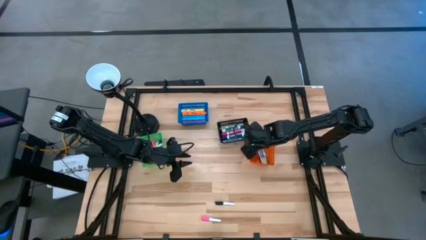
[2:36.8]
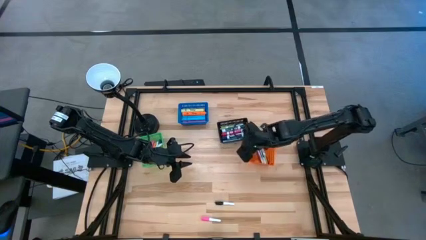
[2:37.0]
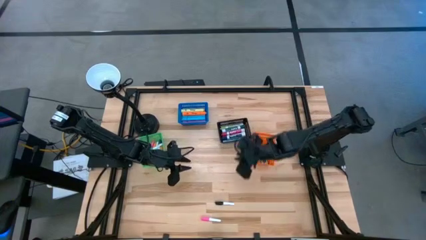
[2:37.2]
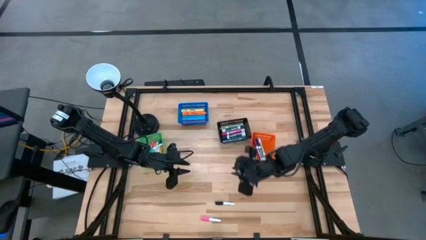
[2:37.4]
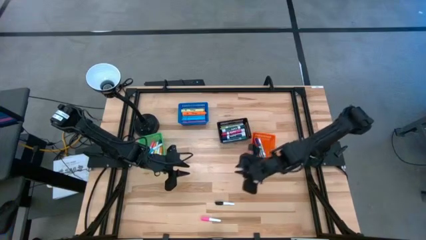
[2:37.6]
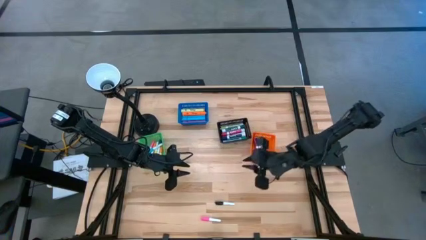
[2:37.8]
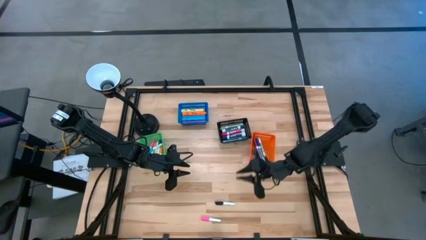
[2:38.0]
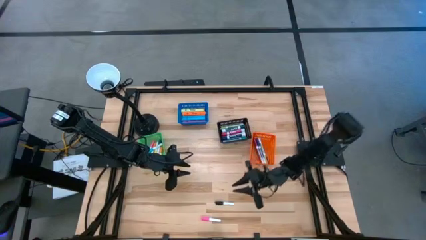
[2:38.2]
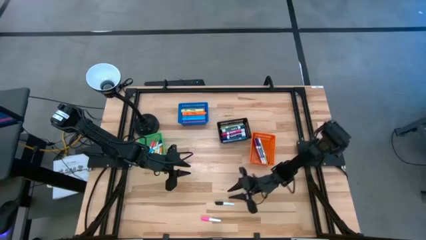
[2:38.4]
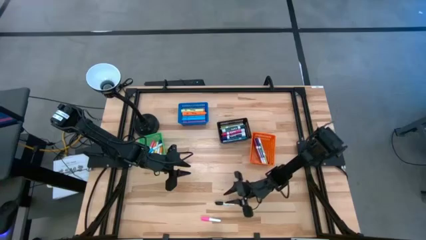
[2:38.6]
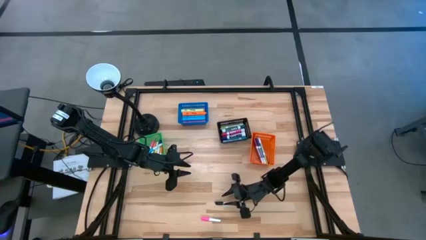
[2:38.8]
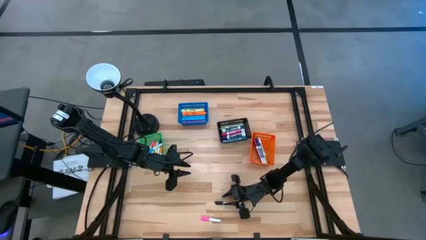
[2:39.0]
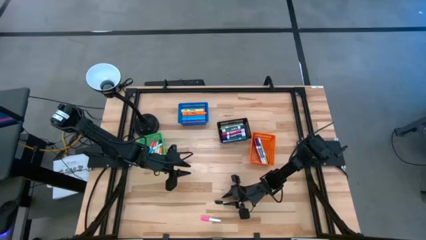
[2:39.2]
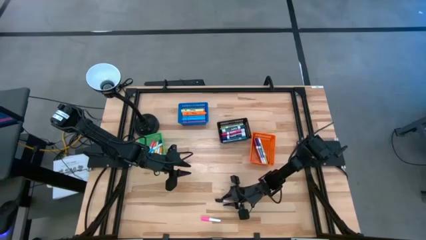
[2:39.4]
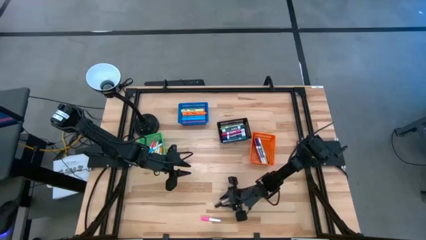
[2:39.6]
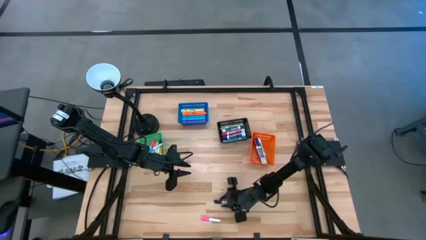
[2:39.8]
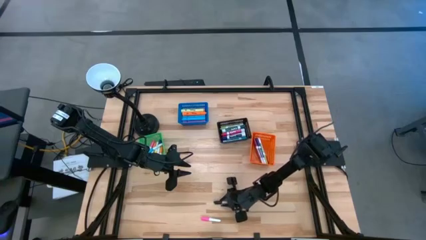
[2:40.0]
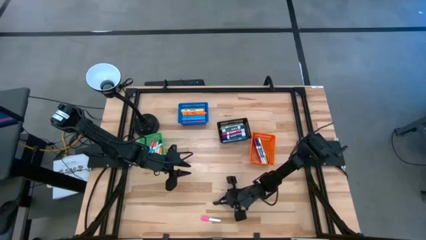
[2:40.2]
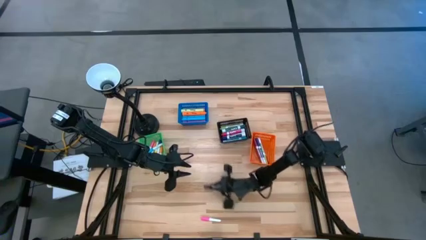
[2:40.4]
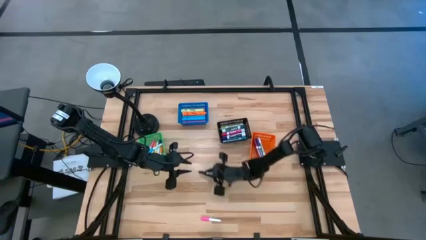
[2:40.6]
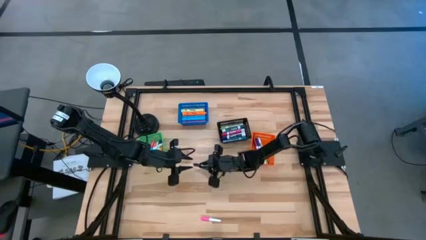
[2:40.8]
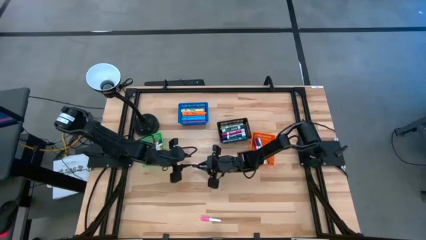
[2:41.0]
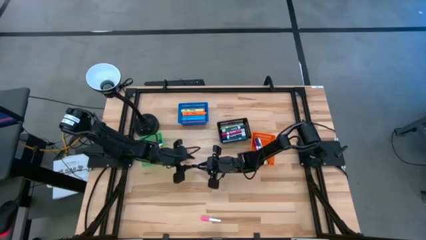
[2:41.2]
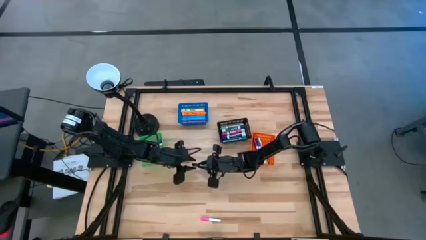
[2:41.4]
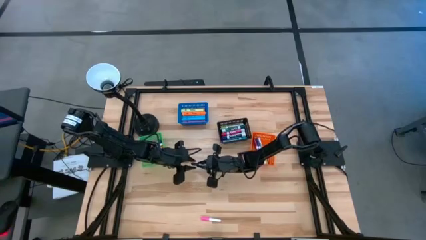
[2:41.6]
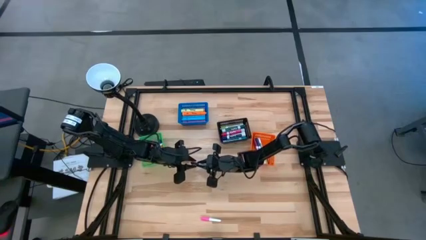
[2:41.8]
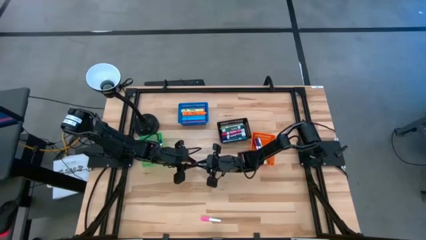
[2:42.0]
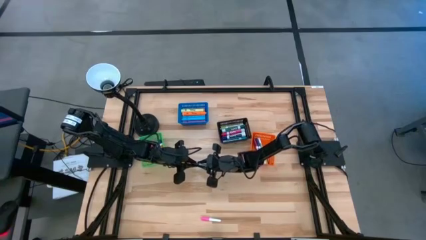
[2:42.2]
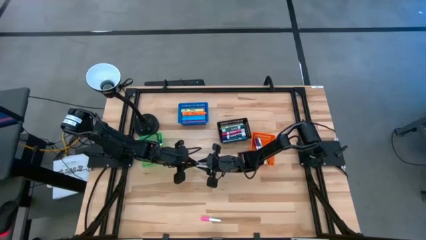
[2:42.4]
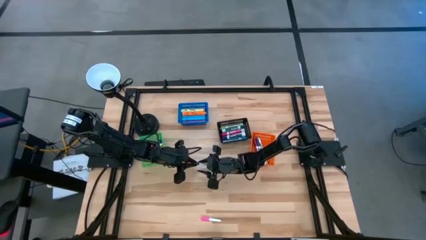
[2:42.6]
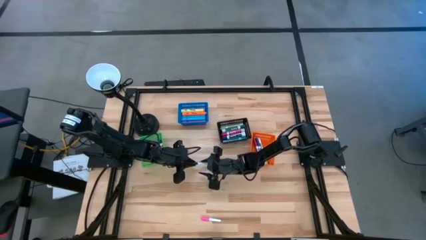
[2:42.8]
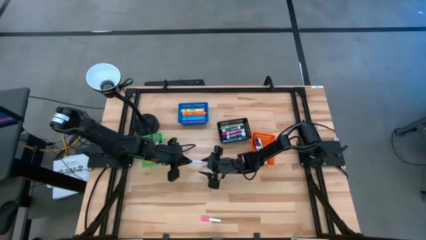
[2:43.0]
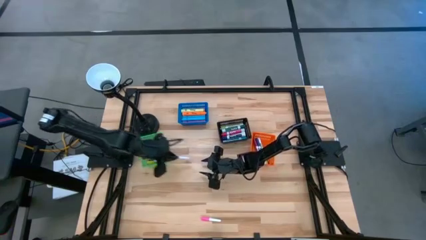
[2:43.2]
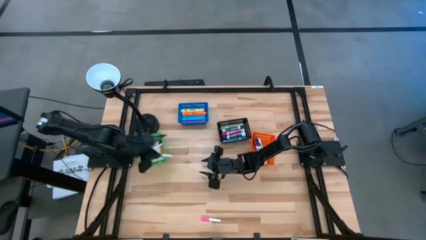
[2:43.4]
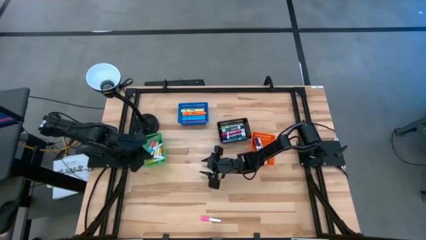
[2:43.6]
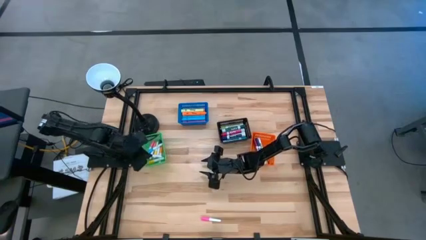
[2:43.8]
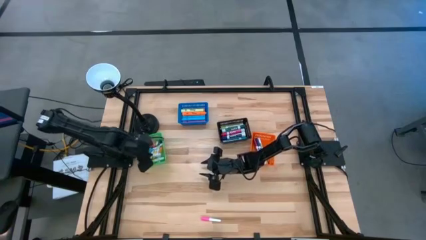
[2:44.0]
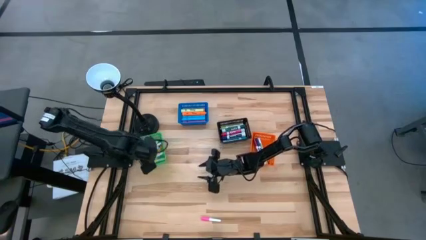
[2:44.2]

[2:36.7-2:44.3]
Task: Pick & Place Markers
Put the black highlighter pen into the green basket

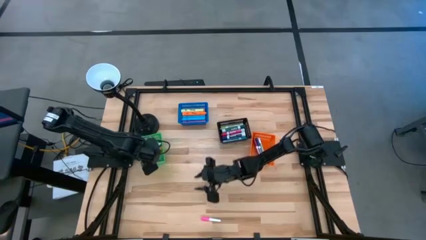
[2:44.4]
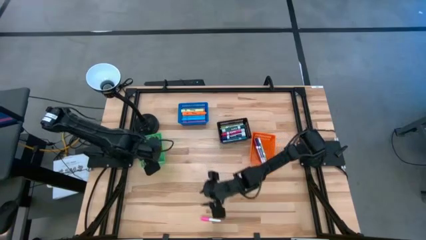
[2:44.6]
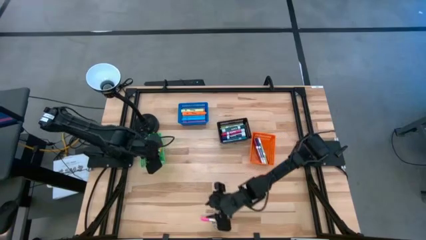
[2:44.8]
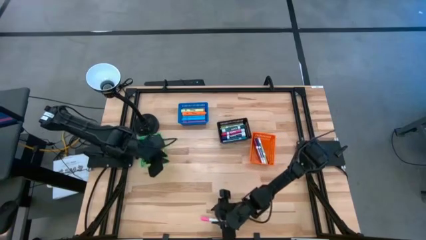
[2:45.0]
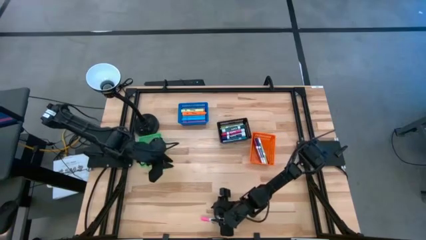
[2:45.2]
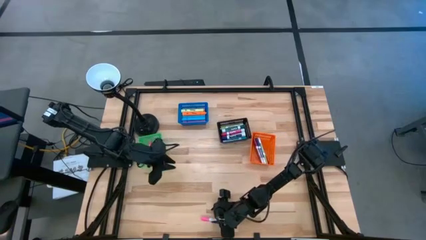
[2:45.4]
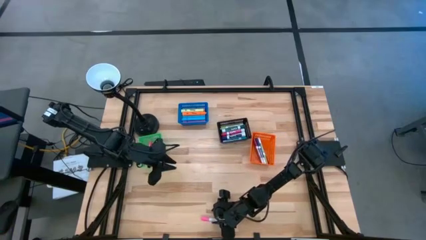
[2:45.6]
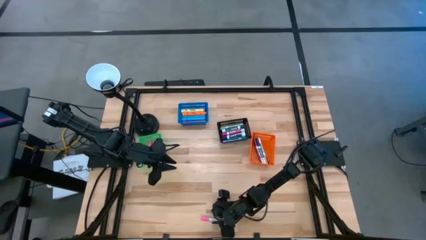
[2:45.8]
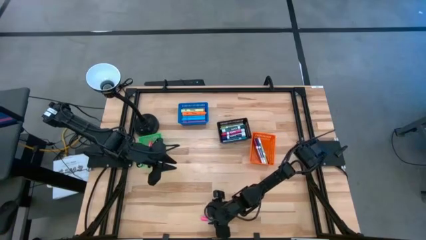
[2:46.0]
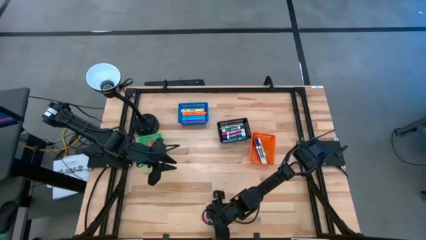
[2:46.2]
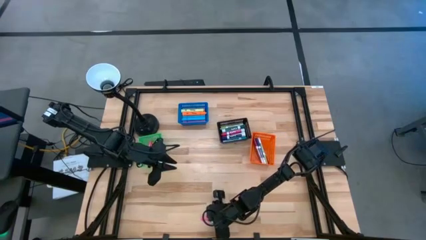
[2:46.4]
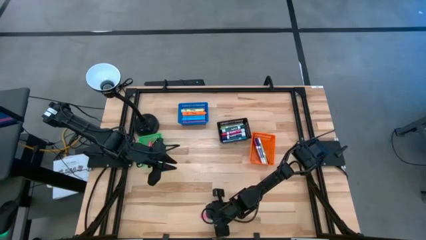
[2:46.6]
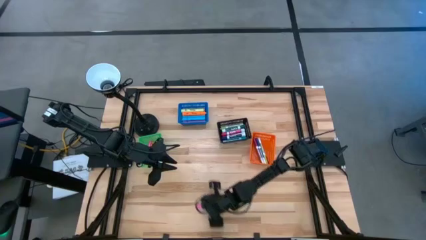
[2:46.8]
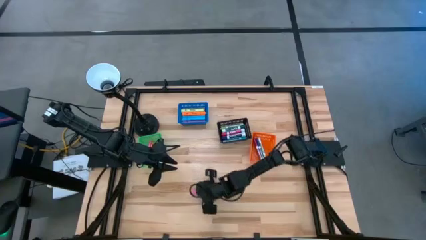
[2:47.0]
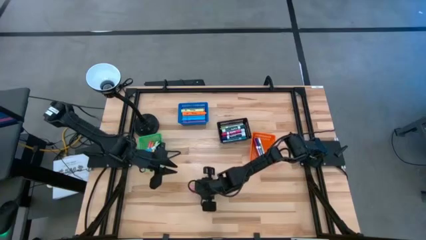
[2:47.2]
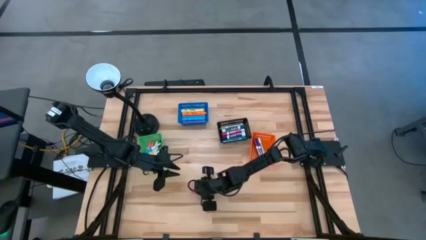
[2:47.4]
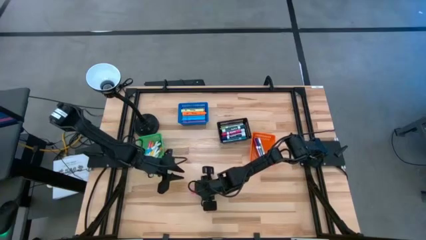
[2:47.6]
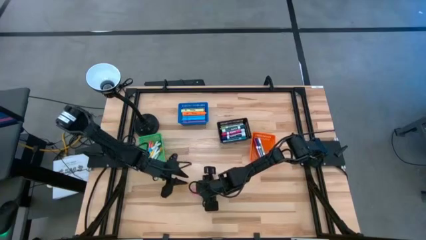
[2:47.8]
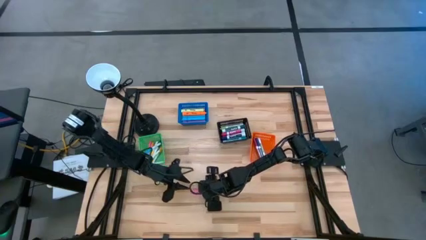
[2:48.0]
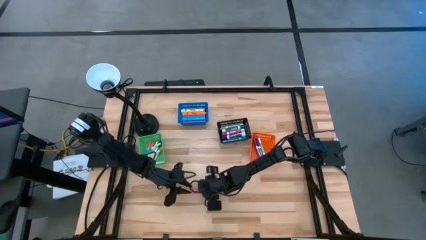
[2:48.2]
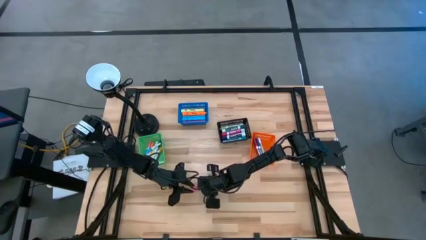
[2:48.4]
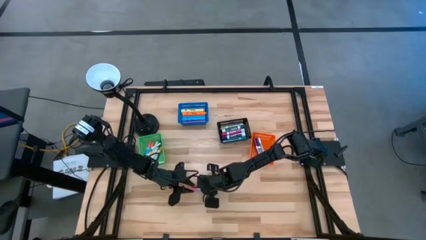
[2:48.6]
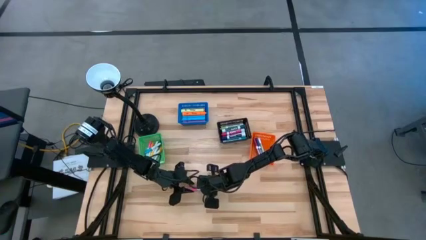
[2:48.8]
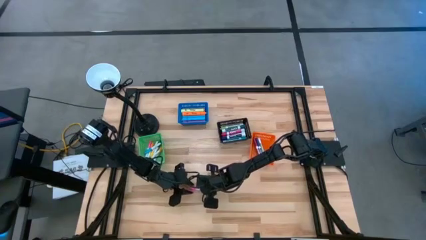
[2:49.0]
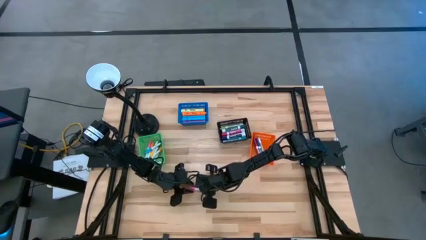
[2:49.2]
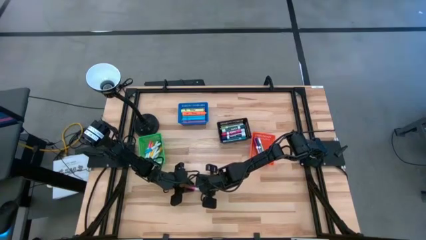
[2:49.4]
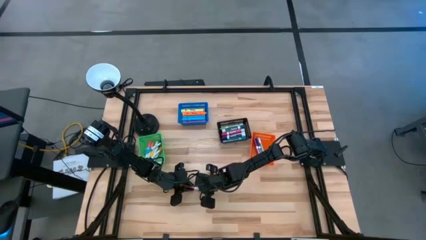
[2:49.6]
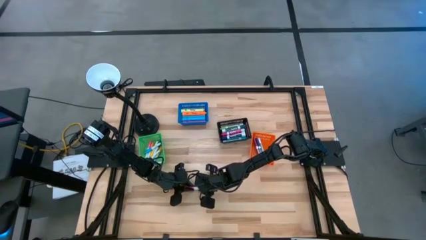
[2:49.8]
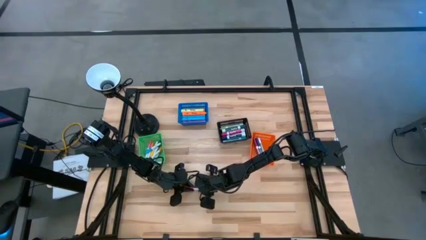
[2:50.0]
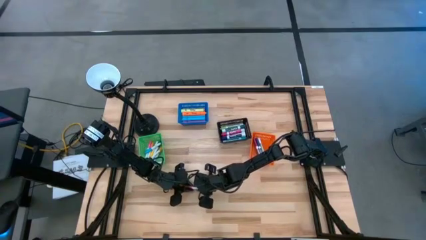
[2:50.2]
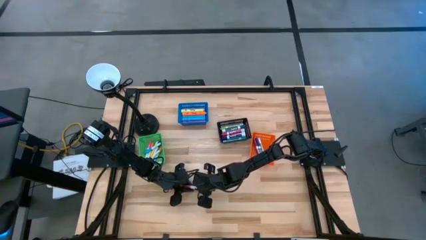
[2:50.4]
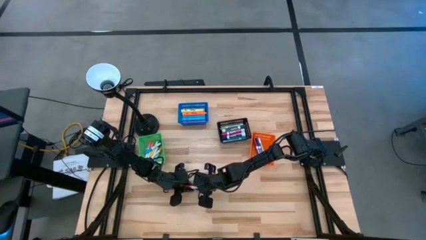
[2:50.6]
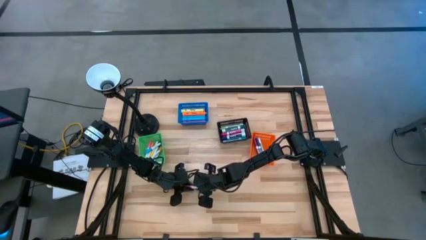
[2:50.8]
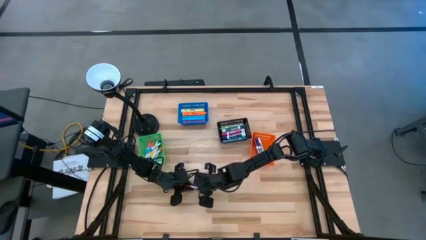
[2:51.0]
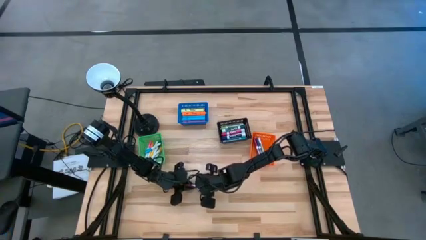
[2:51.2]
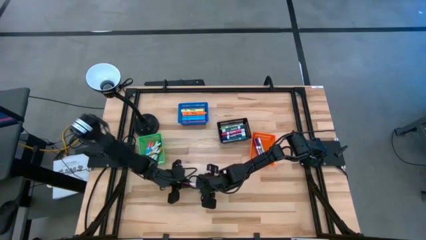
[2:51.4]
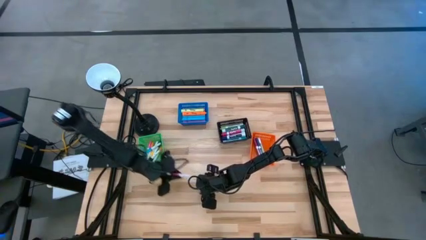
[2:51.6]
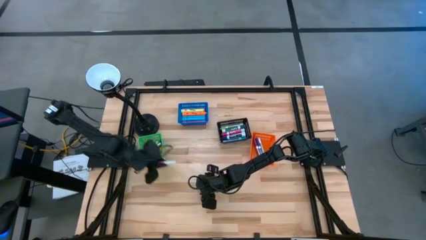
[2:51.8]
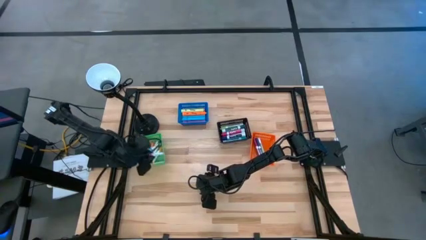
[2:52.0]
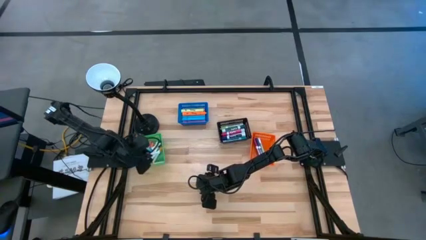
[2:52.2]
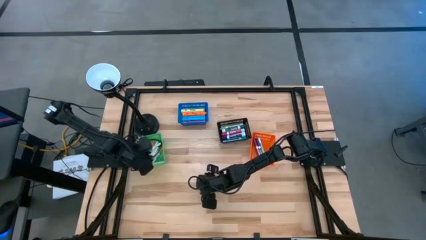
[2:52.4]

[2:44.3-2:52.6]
Put the pink highlighter pen into the green basket
